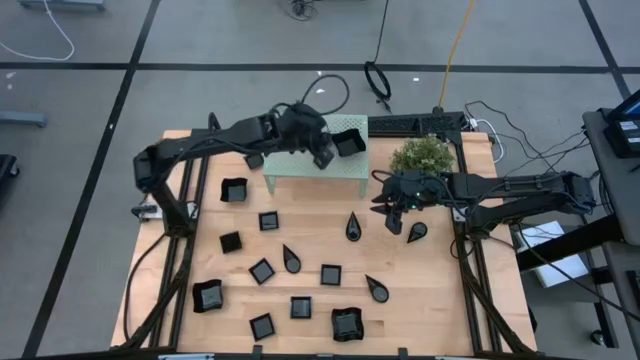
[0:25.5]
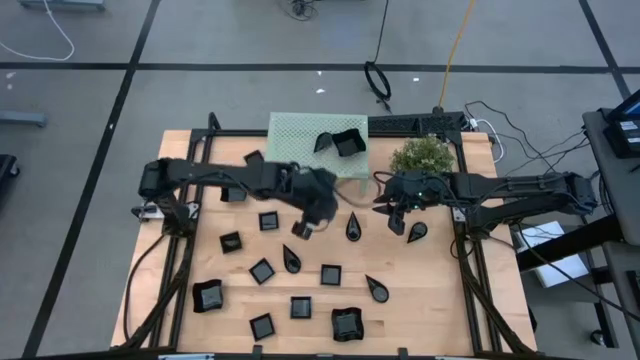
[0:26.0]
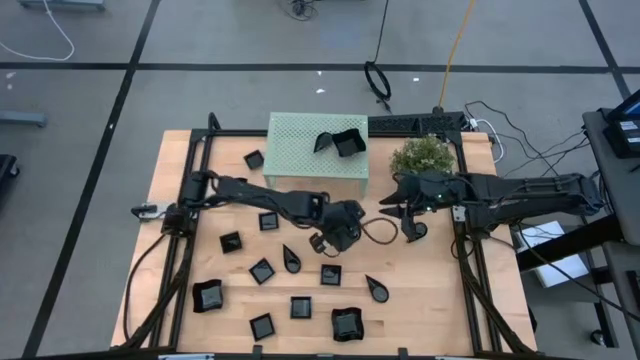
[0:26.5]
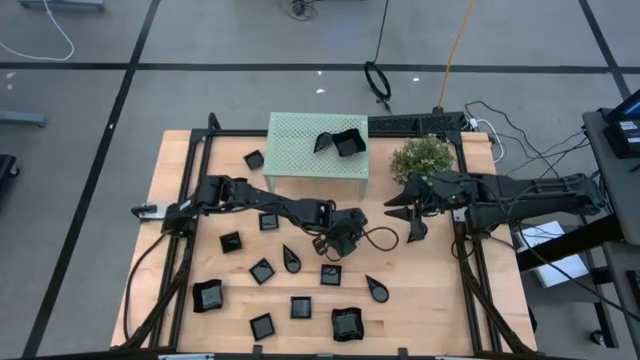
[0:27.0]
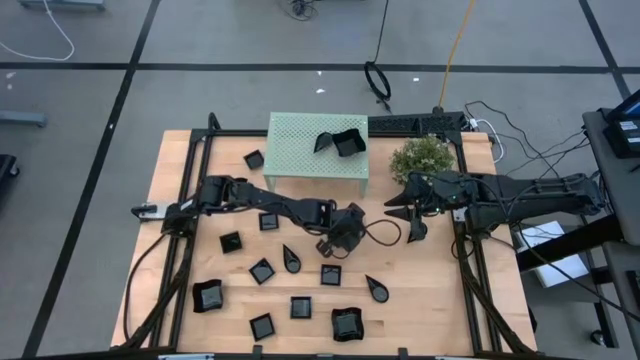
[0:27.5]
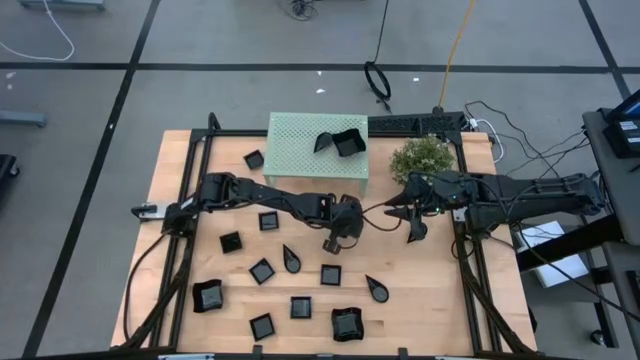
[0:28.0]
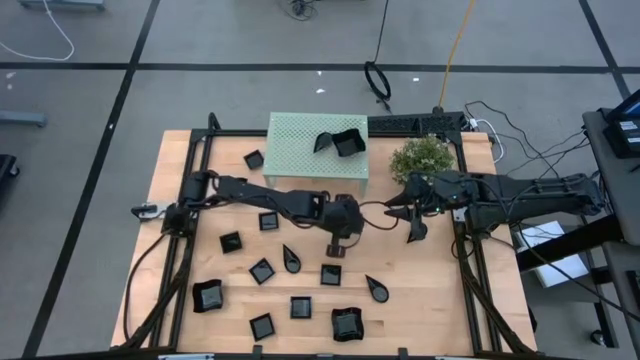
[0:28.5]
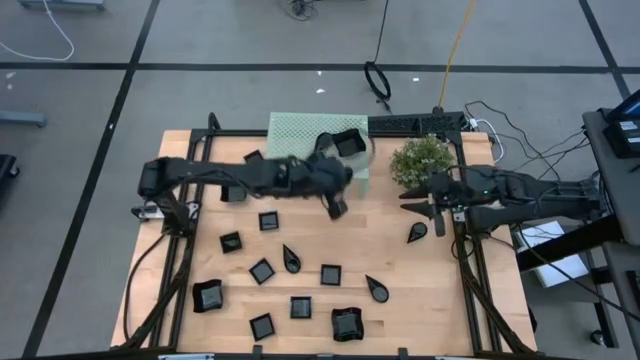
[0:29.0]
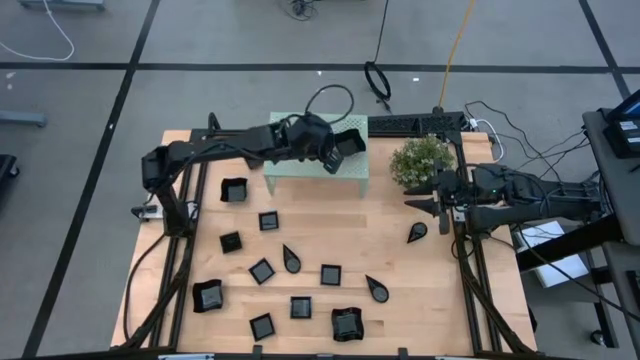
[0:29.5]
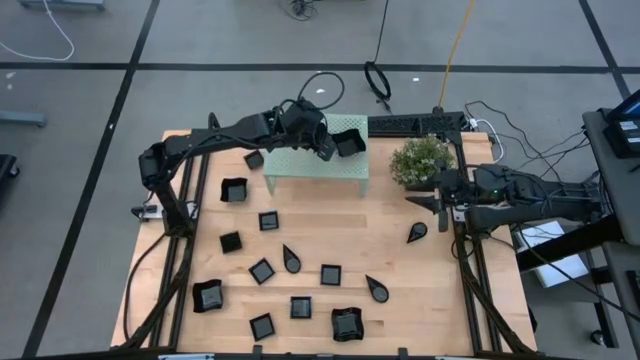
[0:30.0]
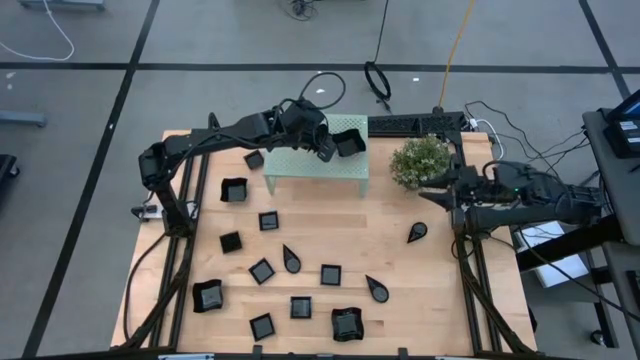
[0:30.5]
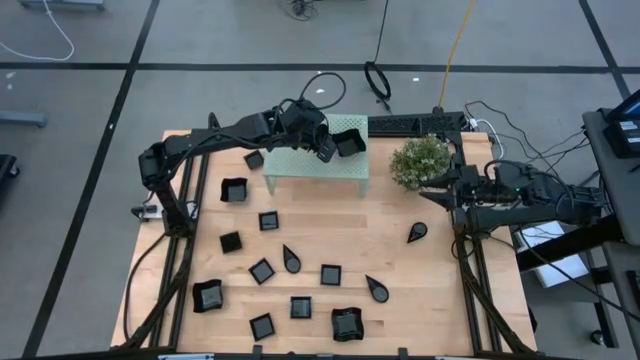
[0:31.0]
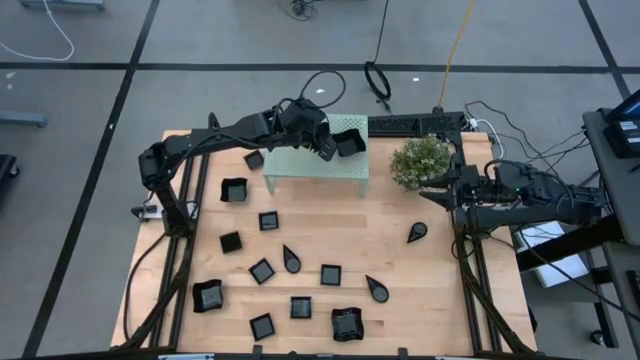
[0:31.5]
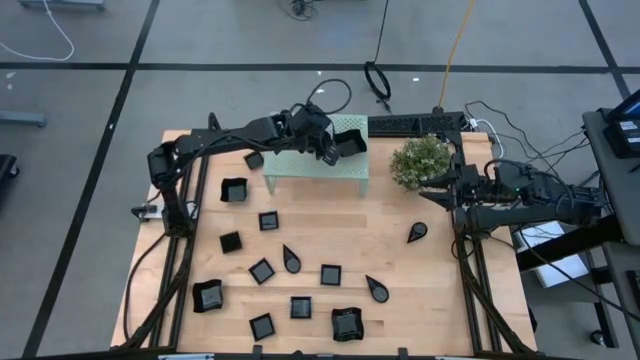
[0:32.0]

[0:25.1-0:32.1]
Task: Pick & Place Mini shaped plates
Stack the black drop-shaped plate on top of the other black drop-shaped plate on the shelf

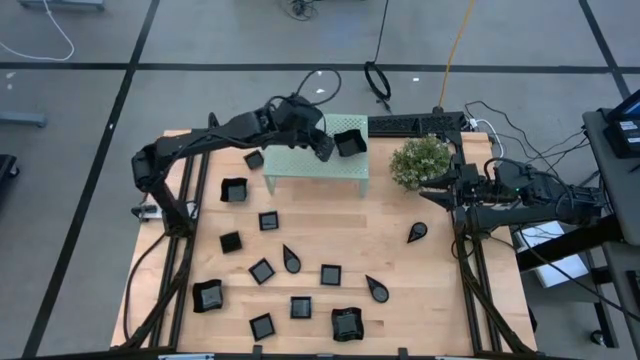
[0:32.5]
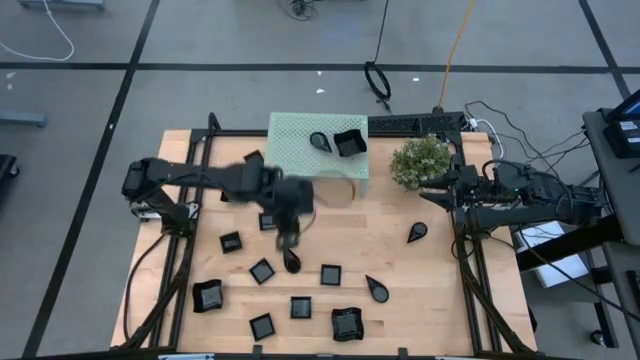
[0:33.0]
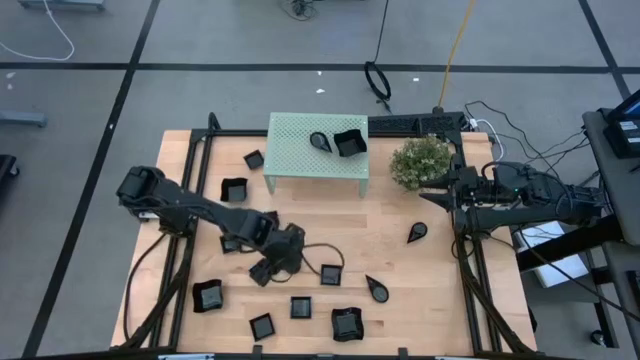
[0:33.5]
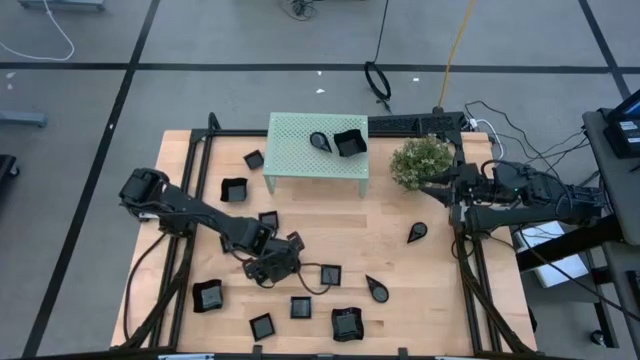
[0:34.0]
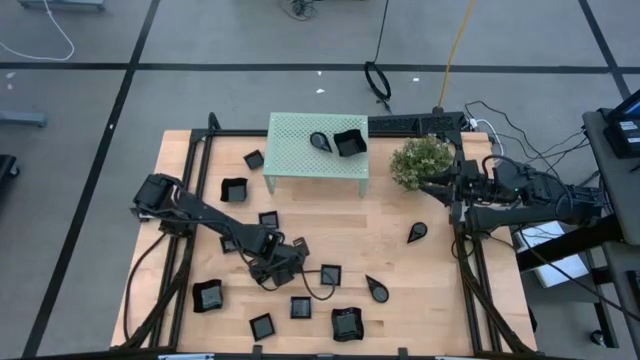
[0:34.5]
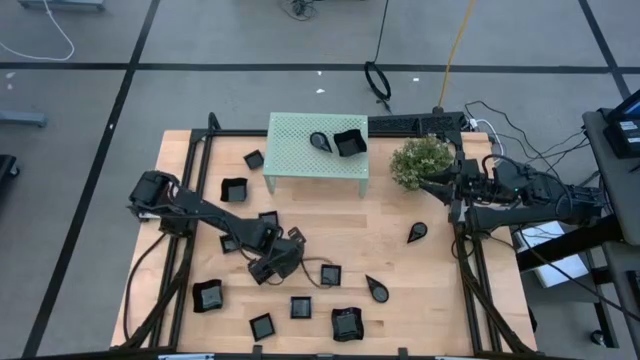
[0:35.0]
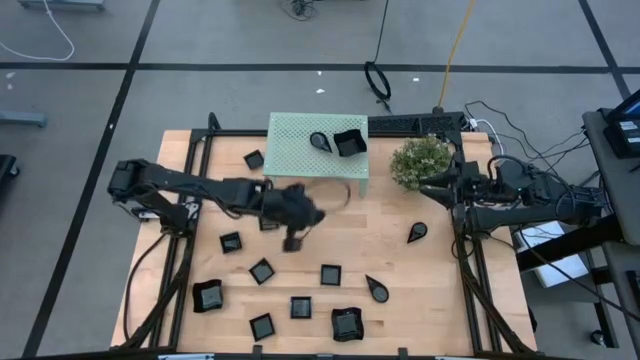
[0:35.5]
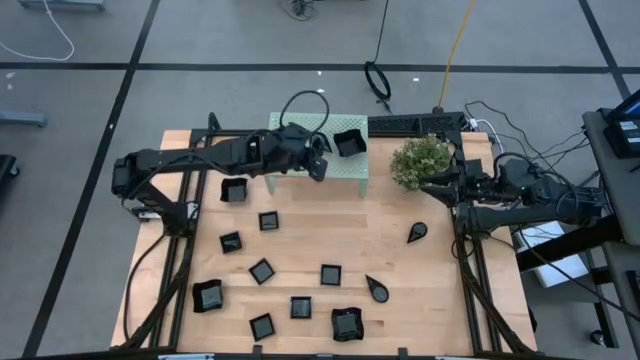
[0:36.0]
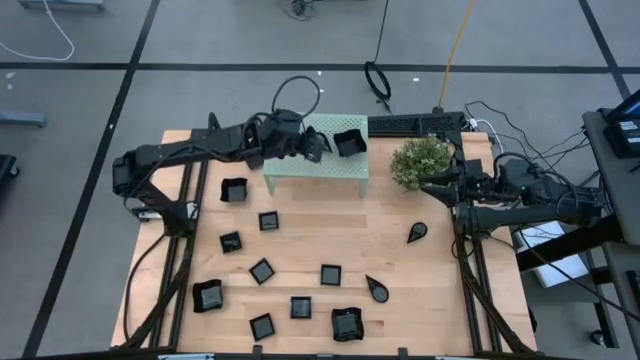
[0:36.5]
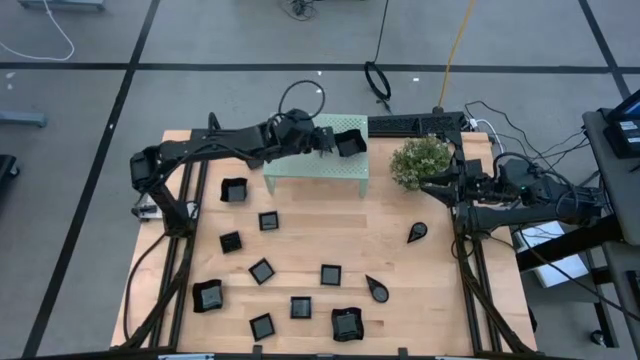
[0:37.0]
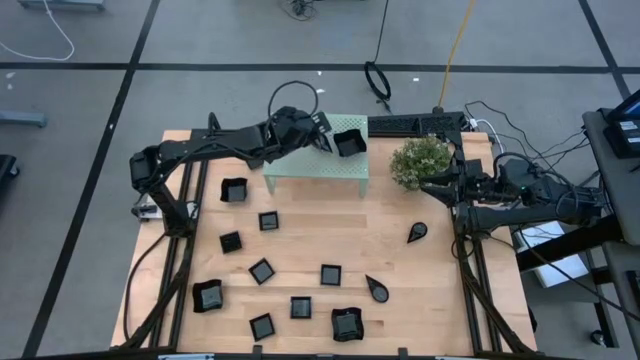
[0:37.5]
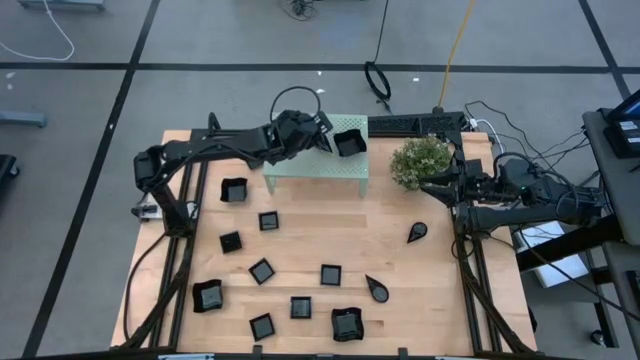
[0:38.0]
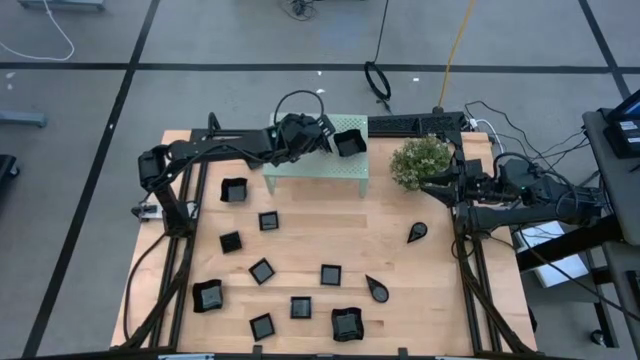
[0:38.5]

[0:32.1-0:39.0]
Stack the black drop-shaped plate on top of the other black drop-shaped plate on the shelf

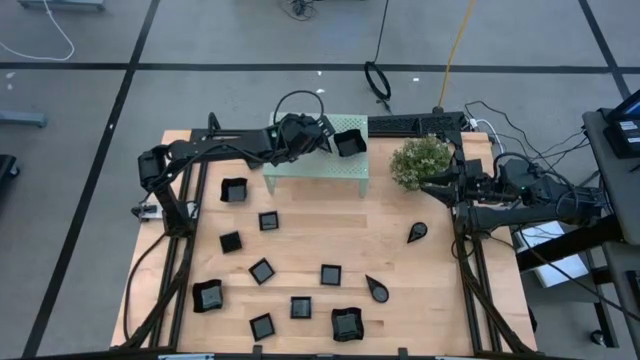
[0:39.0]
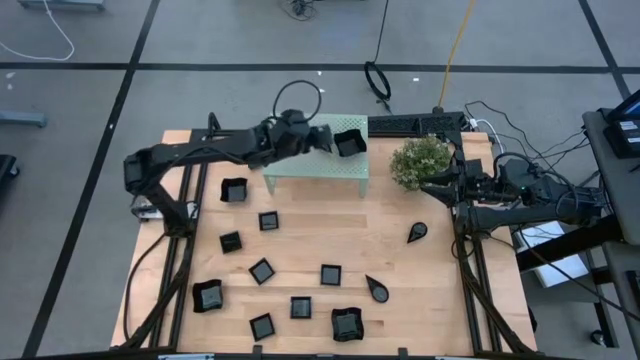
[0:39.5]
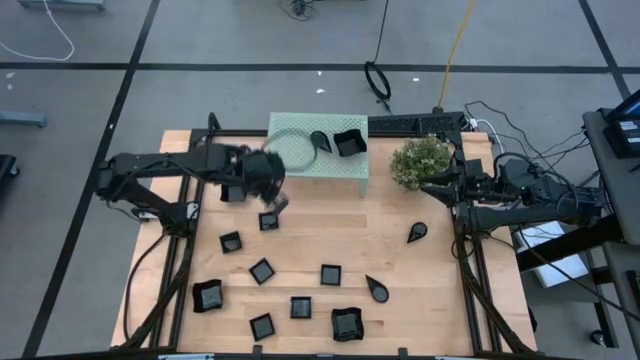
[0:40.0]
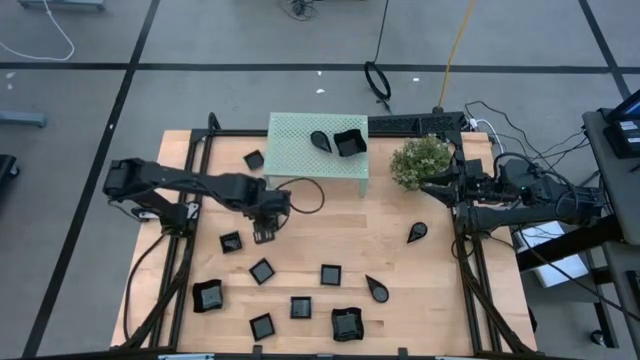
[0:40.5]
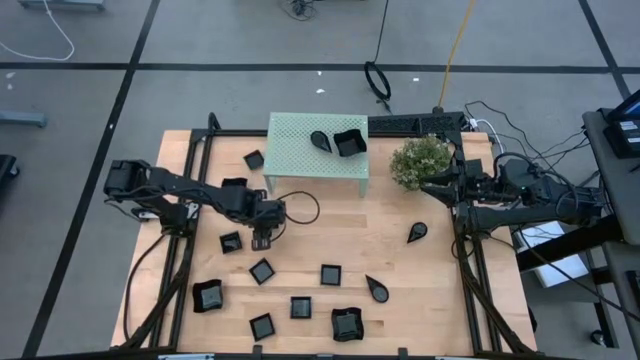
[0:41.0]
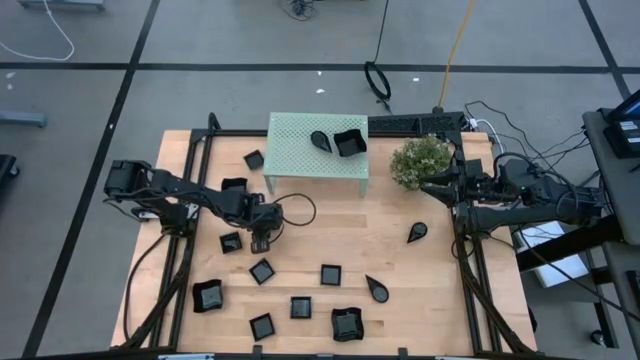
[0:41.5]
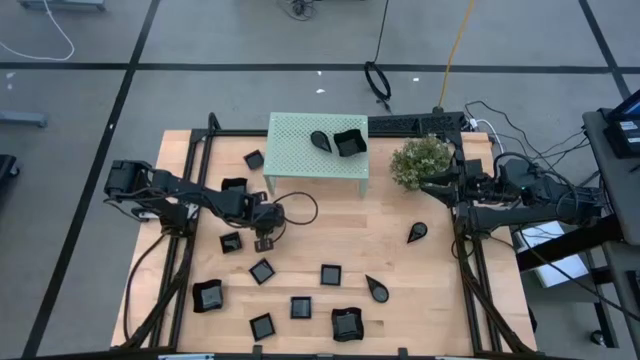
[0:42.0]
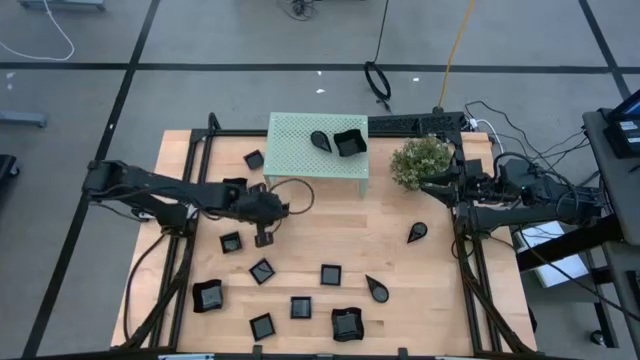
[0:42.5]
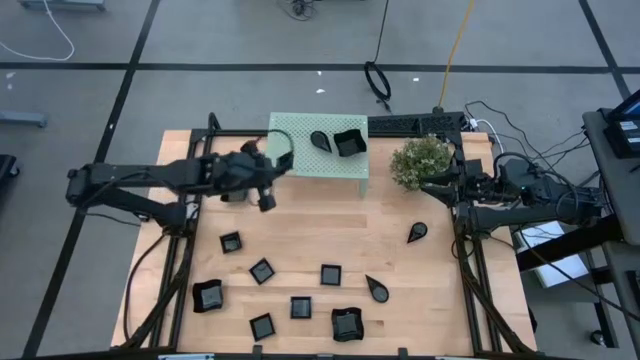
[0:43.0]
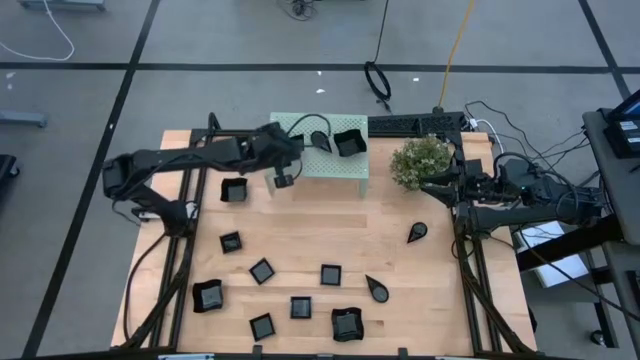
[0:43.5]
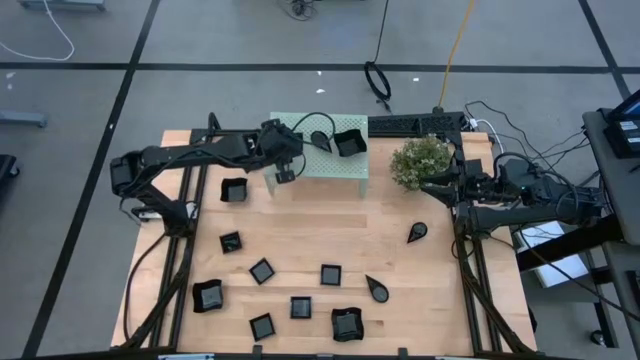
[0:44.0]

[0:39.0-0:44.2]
Put the black square plate on the shelf

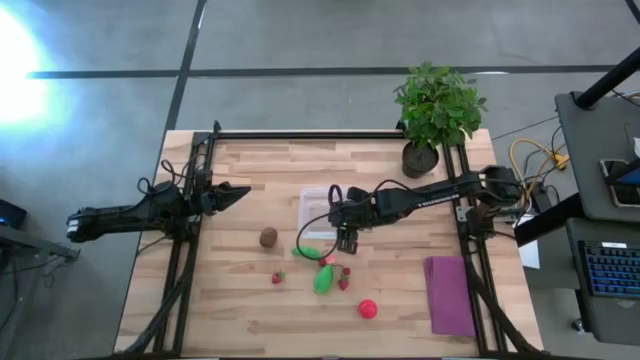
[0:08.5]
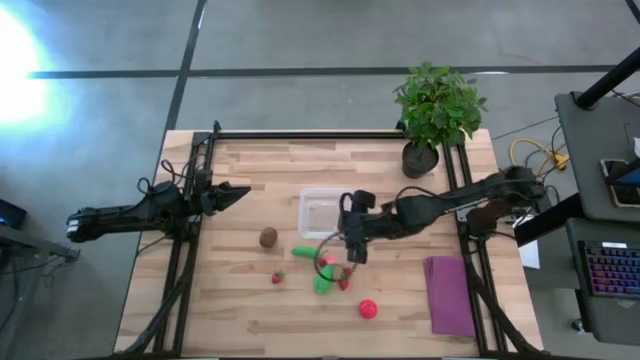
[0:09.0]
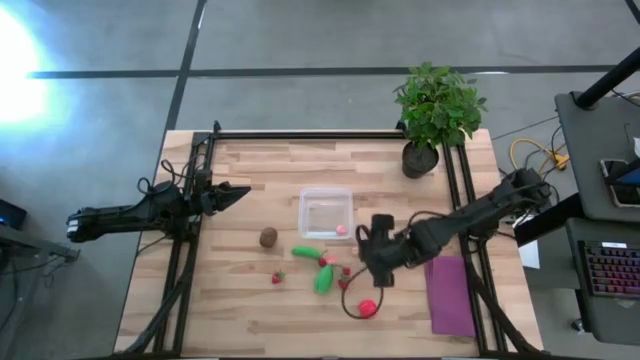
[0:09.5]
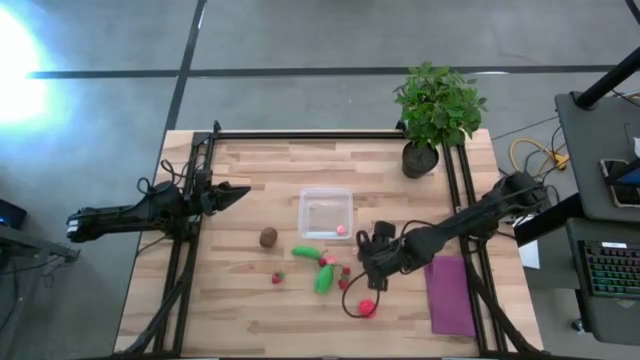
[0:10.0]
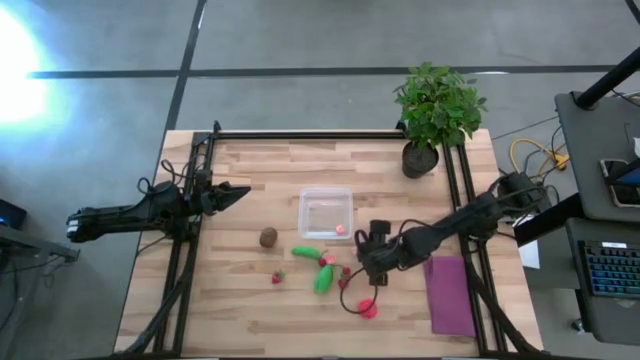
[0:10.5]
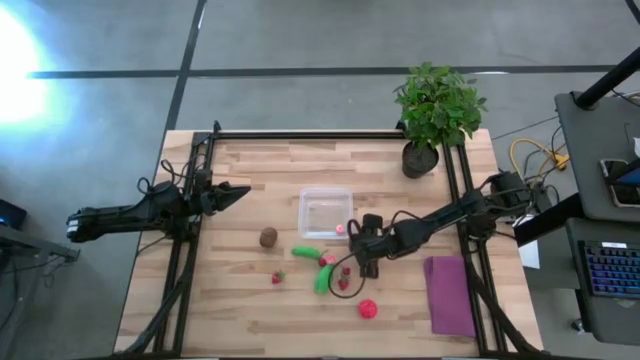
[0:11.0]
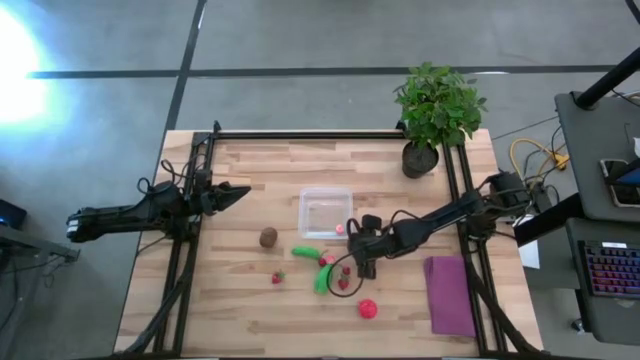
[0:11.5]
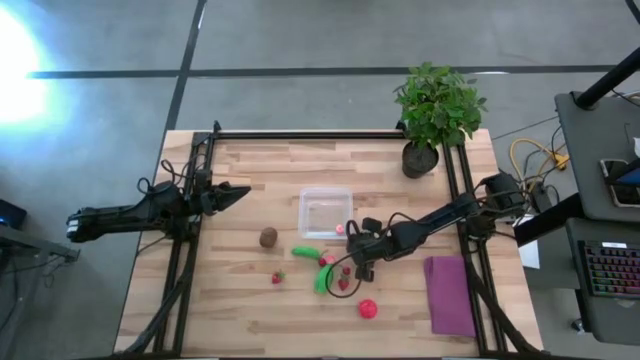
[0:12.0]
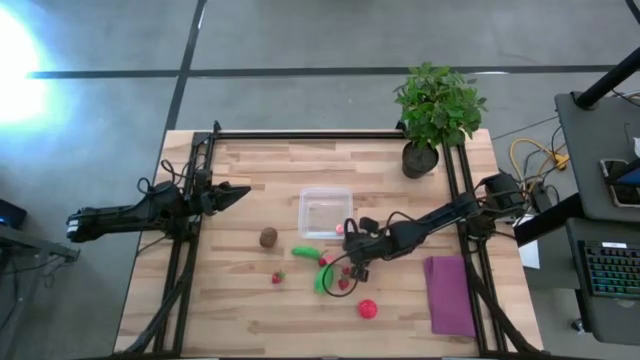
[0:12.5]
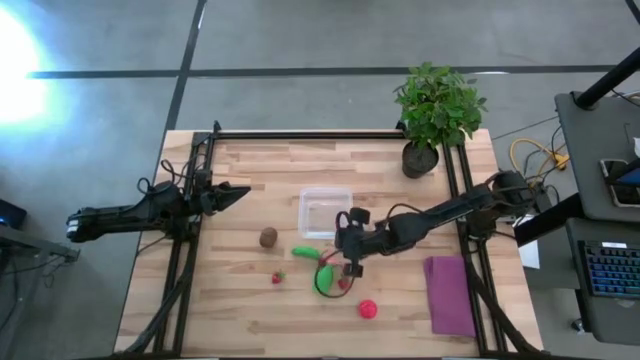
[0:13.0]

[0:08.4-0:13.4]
Task: Pick and placing Produce into tupperware
Put the right pink peach into the transparent bin
